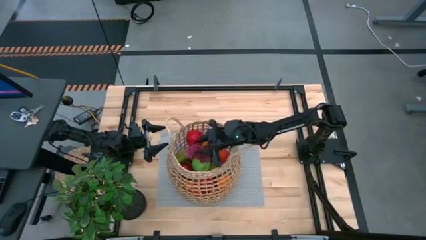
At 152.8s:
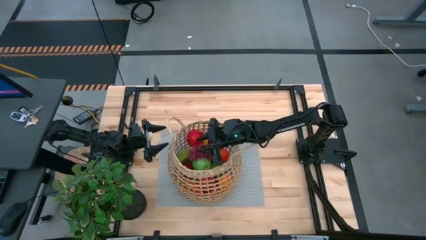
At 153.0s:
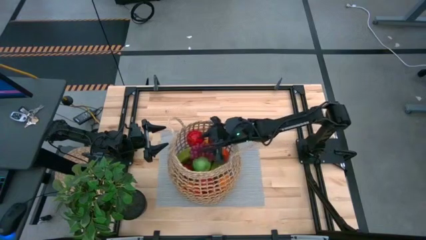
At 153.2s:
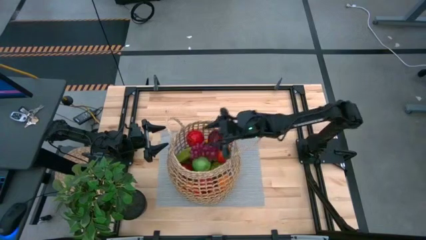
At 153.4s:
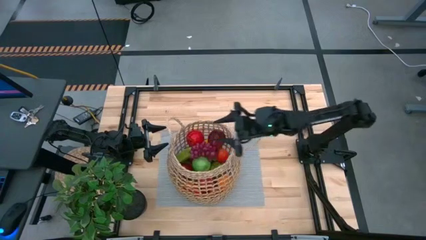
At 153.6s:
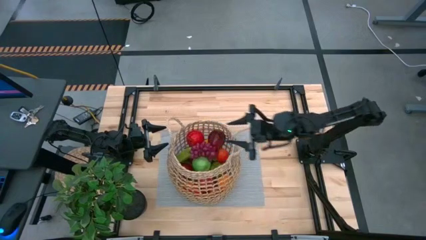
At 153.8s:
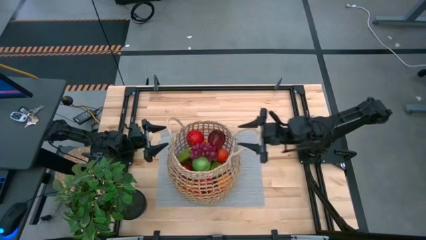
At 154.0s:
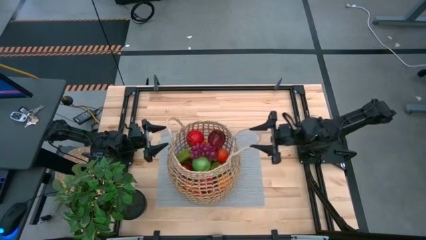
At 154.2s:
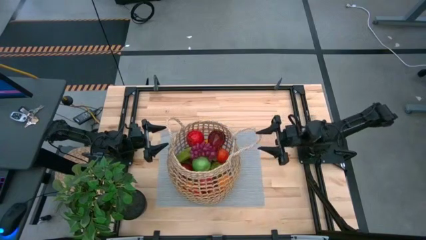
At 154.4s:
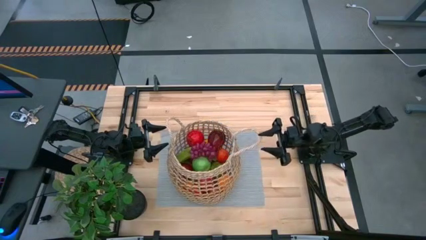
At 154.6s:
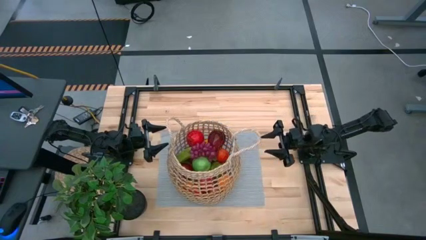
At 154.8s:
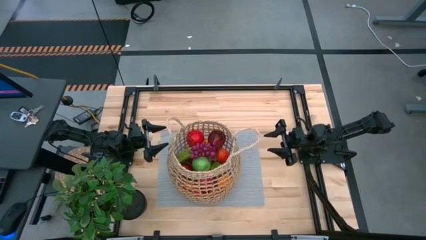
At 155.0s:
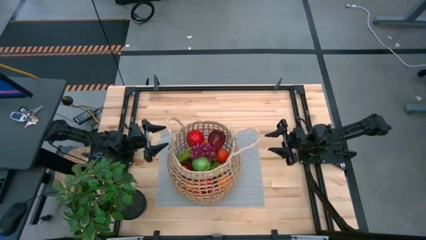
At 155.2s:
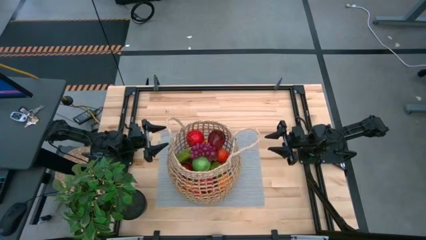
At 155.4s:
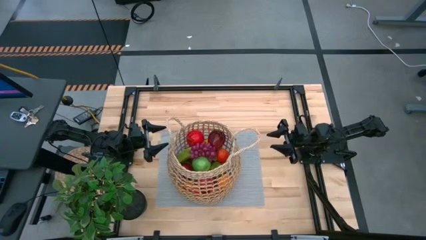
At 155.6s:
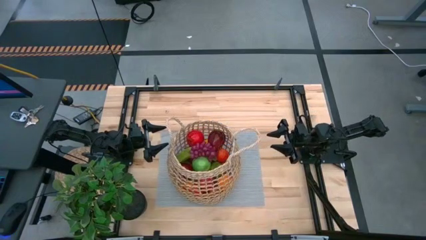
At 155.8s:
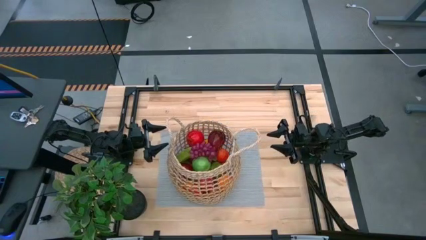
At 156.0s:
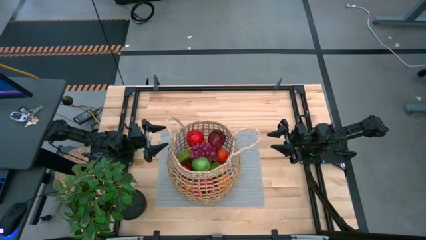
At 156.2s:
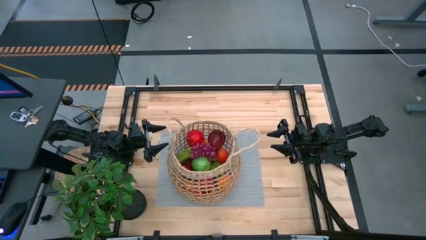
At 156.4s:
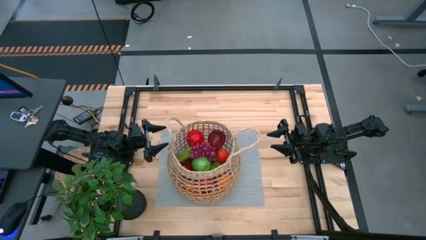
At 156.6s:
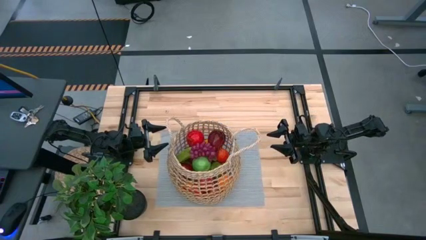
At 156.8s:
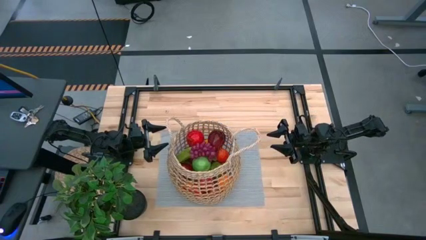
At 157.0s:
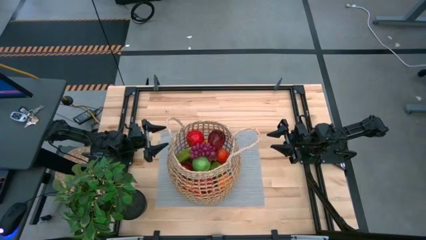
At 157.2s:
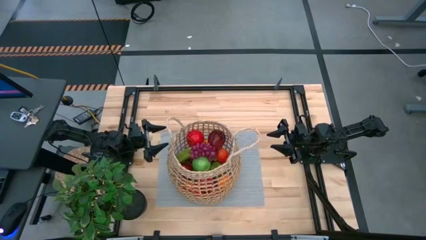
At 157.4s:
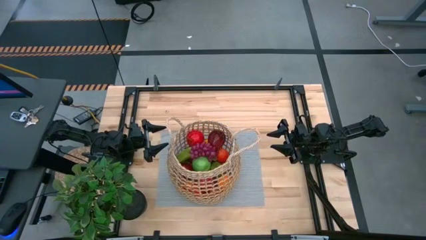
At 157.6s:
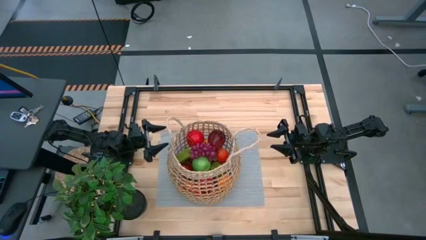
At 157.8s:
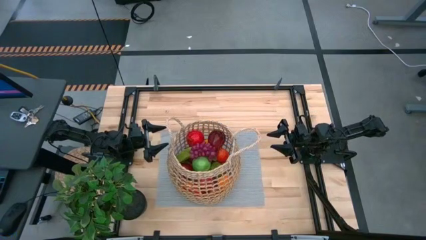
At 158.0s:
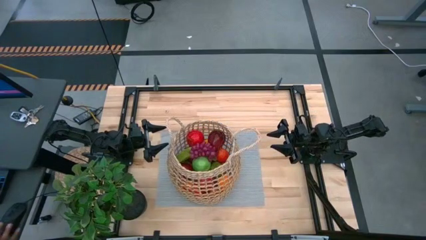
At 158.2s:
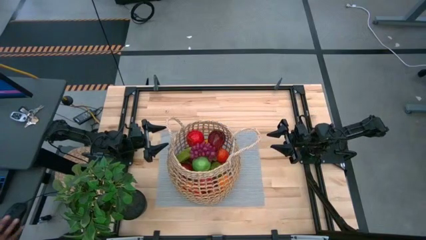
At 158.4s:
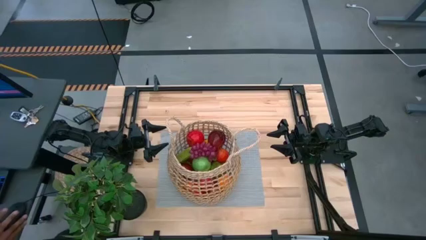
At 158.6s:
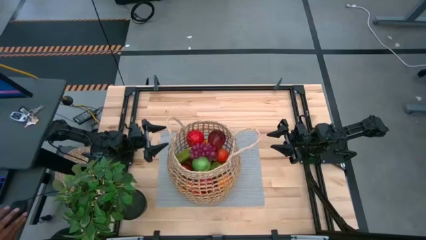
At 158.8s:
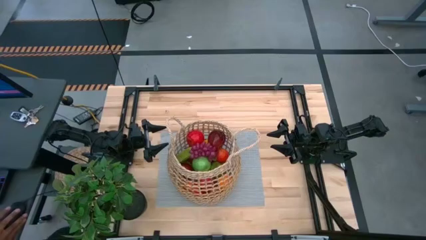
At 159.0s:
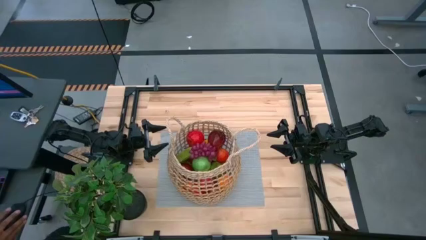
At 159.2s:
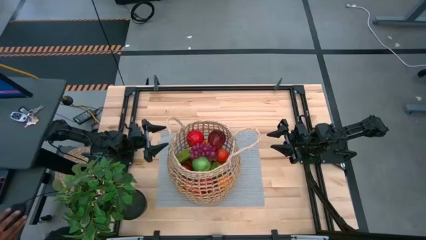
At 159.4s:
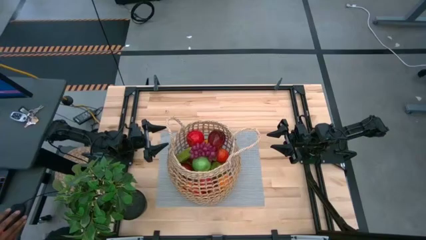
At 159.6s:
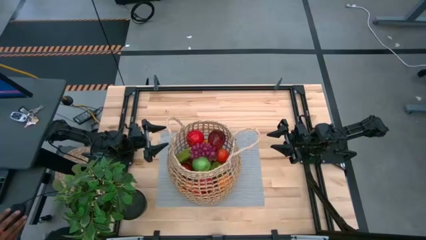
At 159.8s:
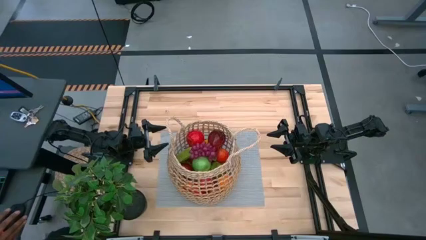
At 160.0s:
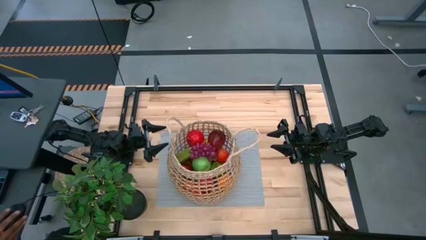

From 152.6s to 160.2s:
Task: Build produce basket
Return to Home Position

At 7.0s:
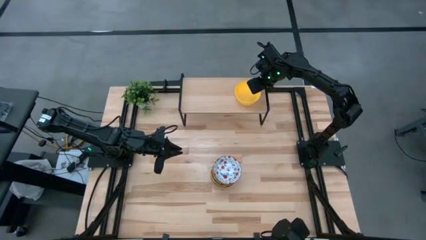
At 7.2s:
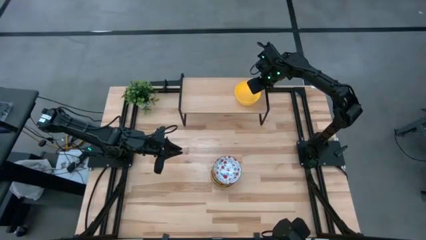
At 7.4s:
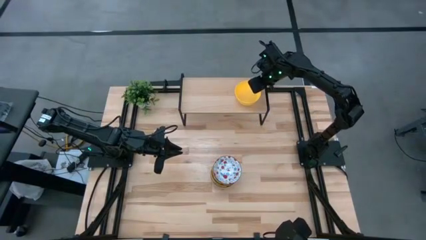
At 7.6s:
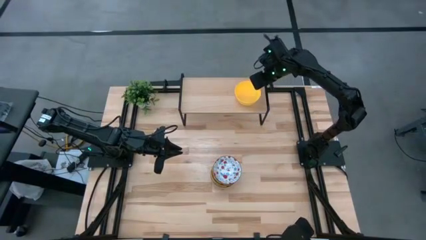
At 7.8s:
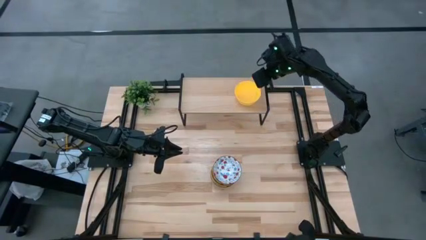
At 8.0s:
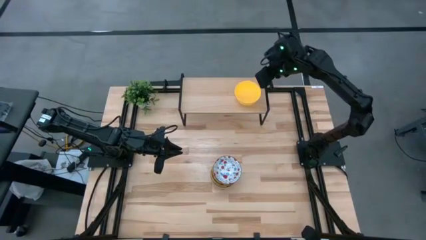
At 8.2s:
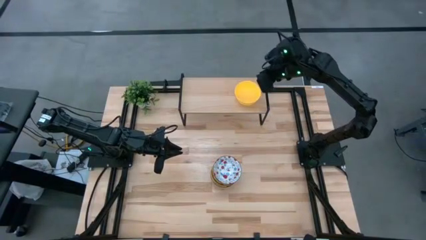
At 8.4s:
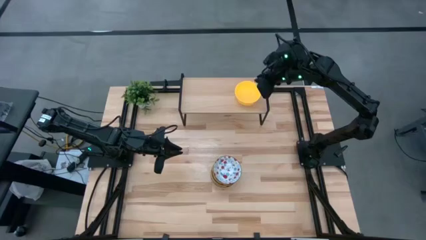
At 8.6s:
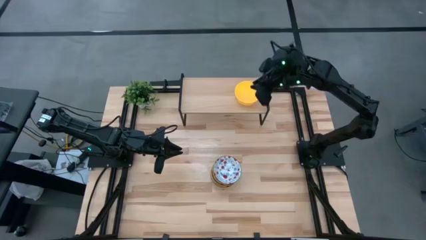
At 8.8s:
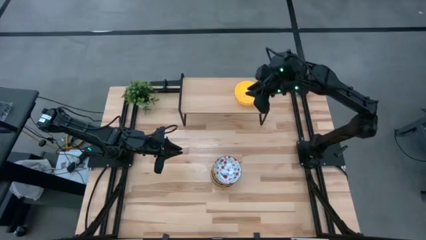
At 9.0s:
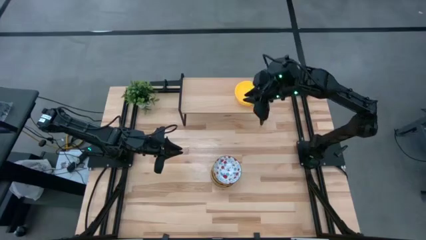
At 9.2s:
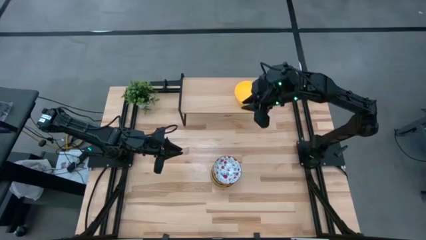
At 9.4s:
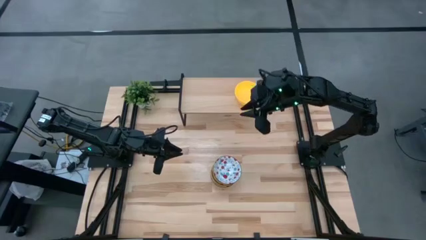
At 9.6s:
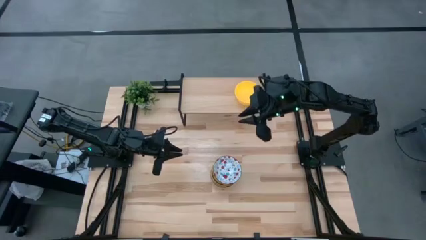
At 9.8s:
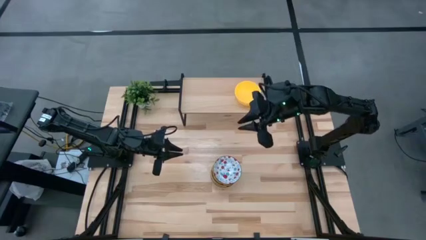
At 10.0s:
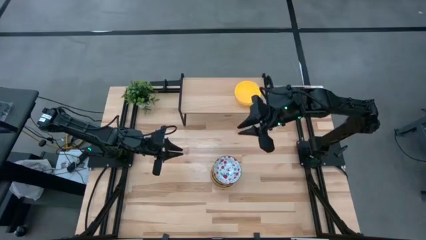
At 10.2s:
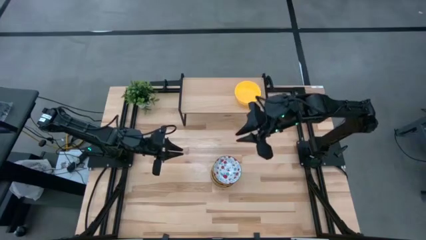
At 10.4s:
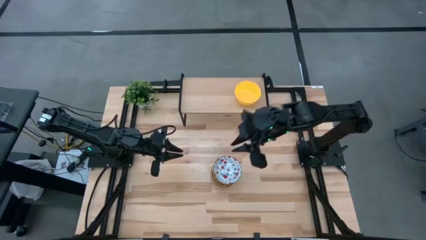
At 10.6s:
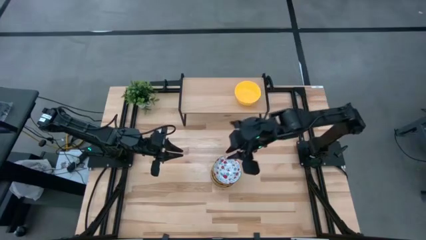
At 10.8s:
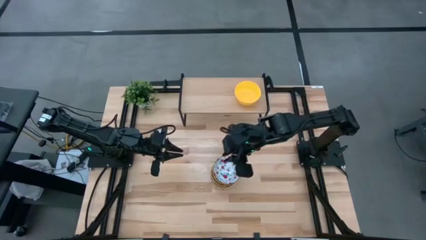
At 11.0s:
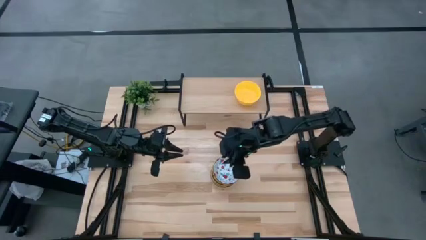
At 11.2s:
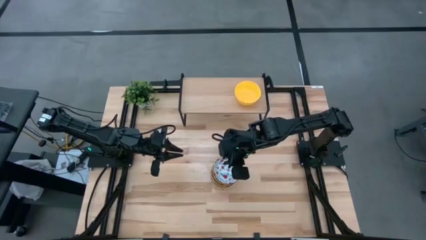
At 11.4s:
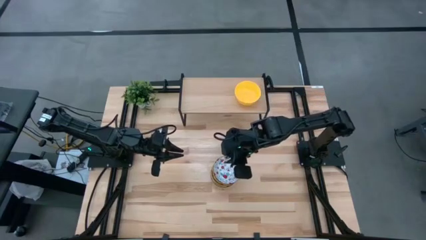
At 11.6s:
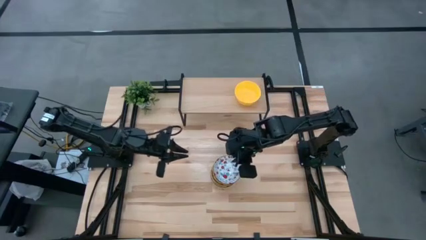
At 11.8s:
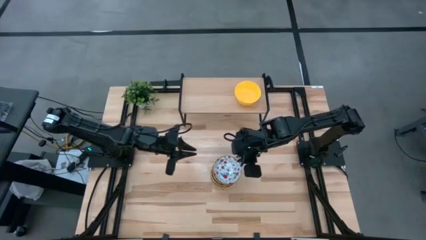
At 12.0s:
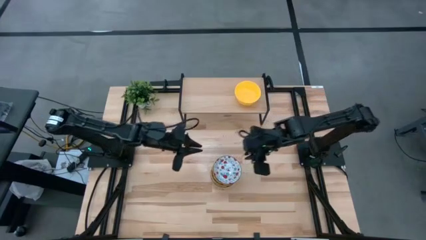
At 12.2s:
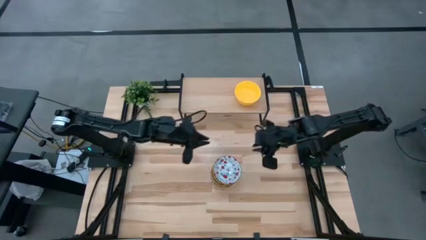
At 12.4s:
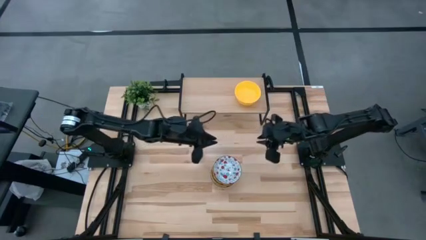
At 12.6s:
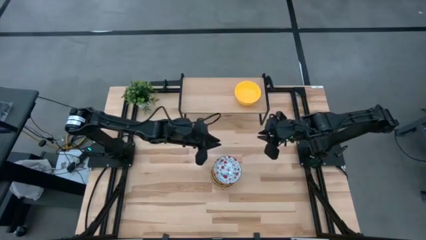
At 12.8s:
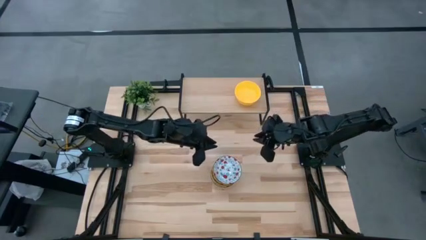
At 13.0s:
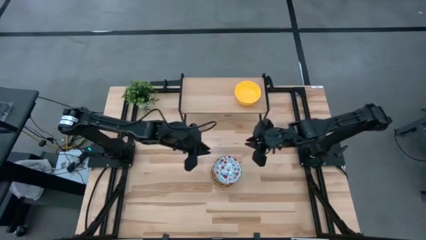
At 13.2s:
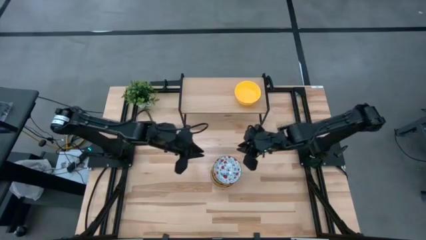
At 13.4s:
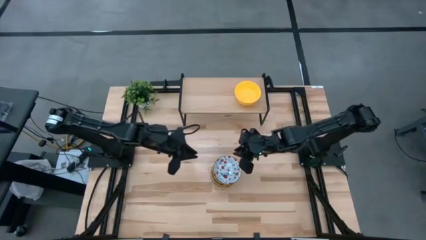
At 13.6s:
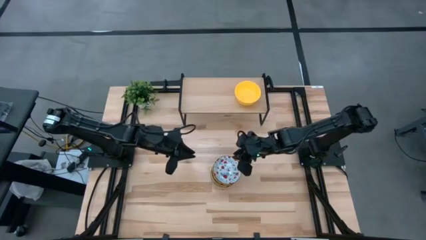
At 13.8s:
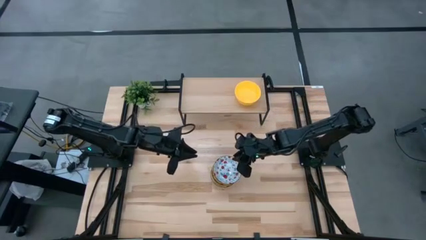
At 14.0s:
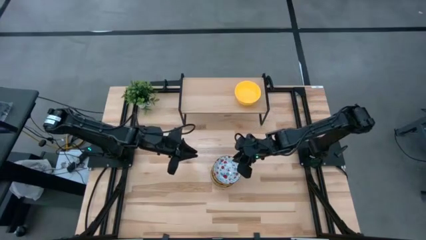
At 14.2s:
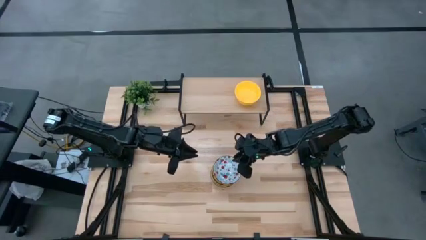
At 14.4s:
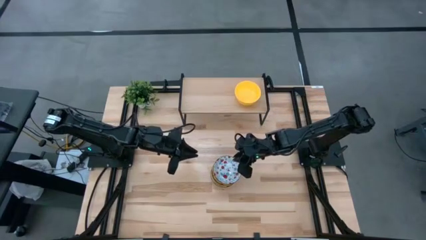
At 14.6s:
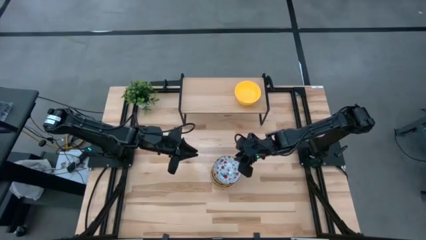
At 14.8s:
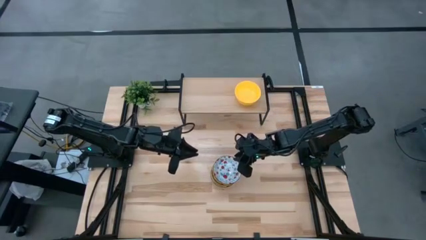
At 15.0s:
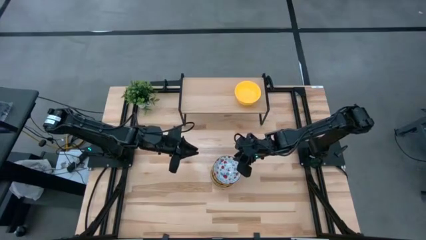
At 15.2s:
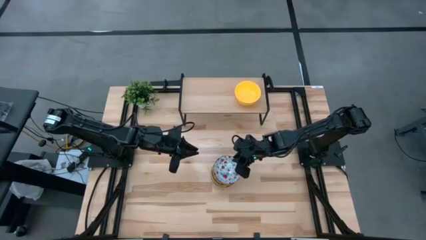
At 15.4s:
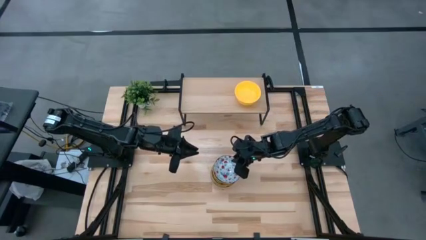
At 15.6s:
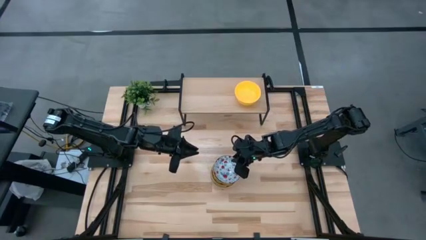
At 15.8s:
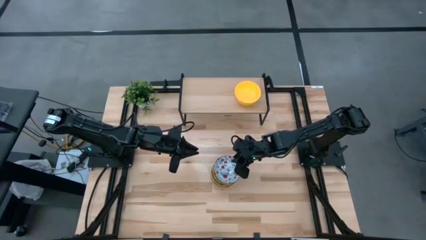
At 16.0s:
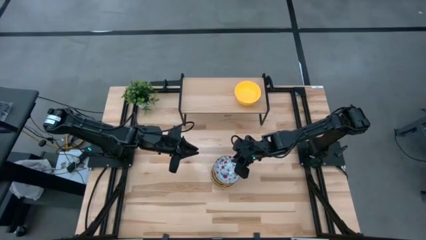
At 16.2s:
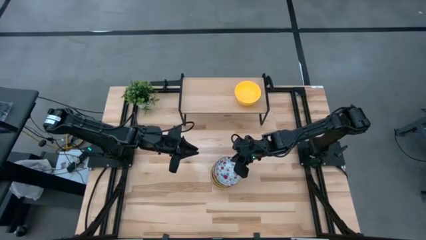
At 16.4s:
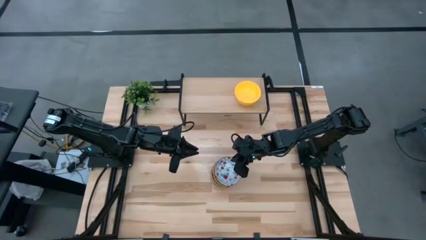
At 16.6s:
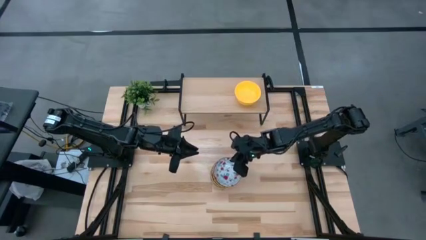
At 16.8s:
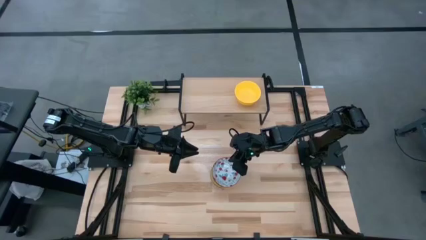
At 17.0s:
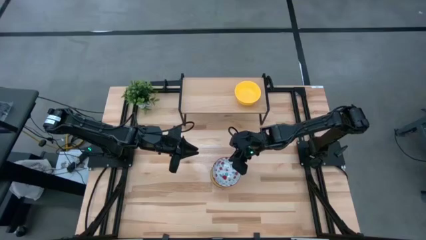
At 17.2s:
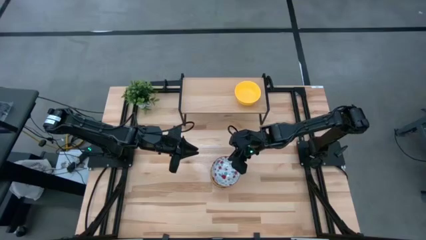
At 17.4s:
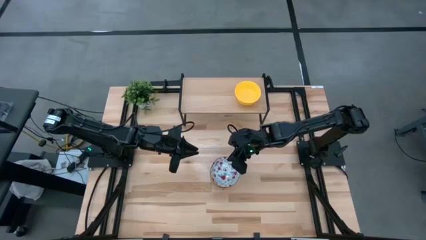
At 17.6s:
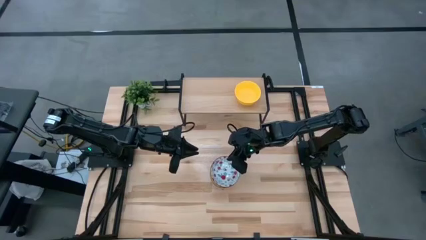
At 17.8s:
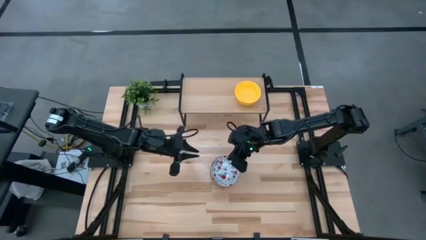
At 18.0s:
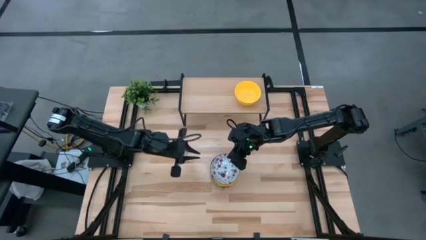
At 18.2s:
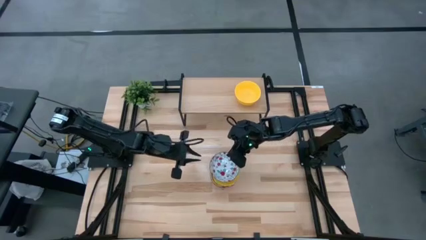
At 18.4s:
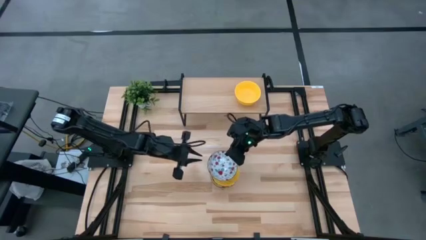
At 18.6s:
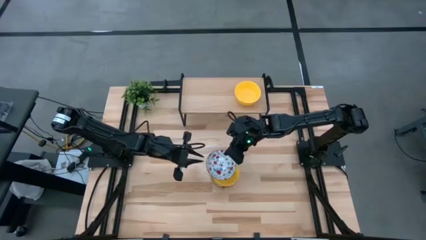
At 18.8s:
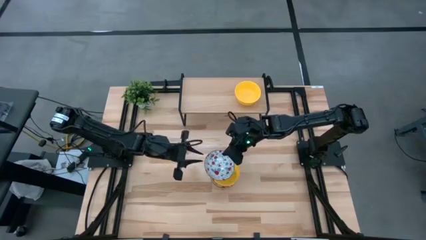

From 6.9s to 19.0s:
Task: Pick & Place Mini bowls
Put the red and blue bowl on the shelf
